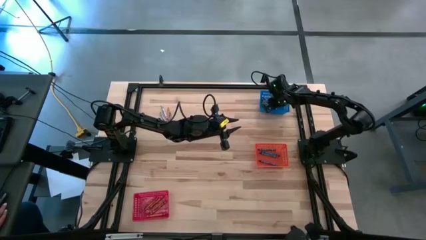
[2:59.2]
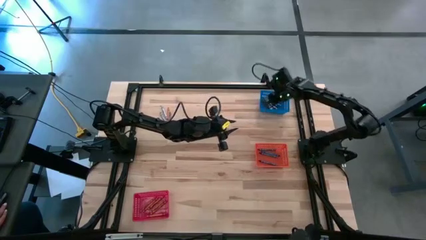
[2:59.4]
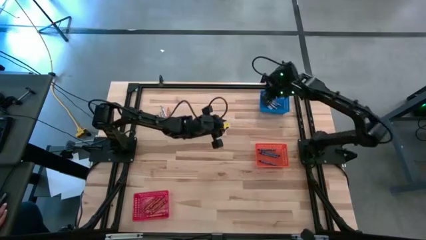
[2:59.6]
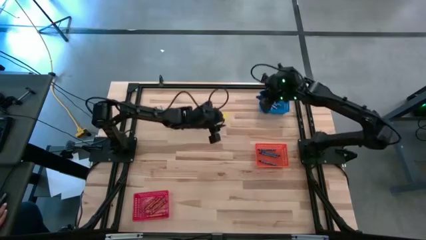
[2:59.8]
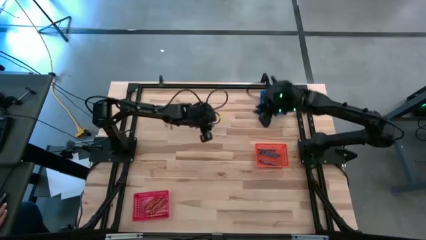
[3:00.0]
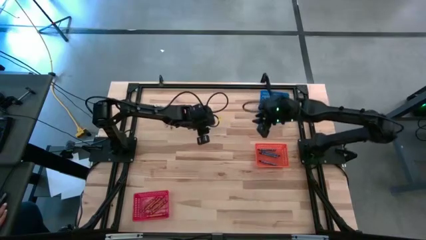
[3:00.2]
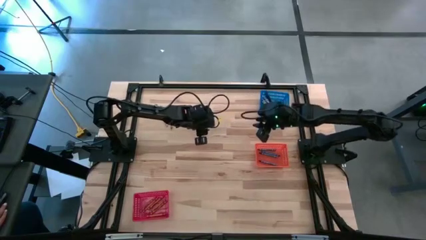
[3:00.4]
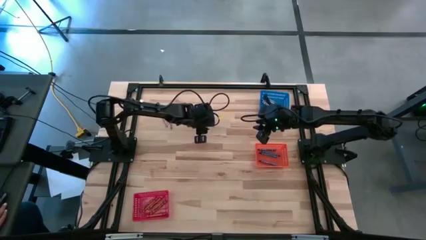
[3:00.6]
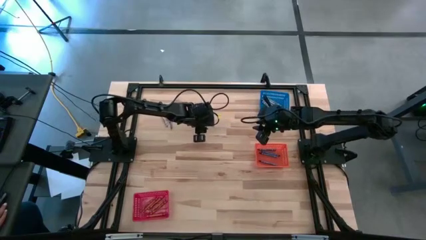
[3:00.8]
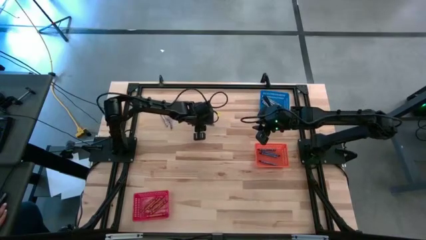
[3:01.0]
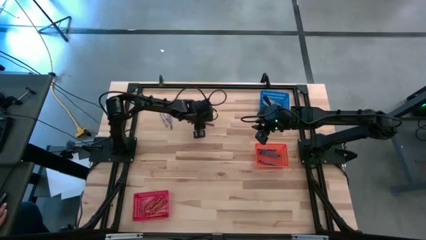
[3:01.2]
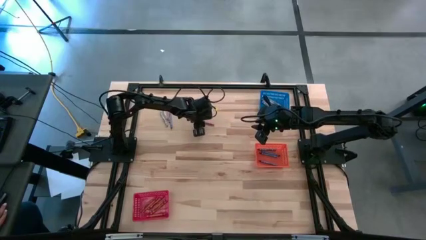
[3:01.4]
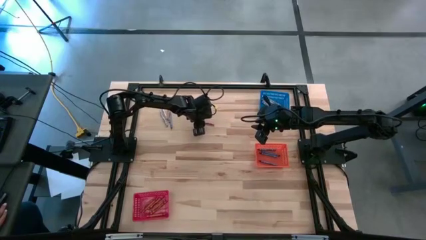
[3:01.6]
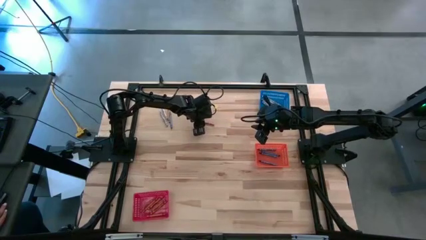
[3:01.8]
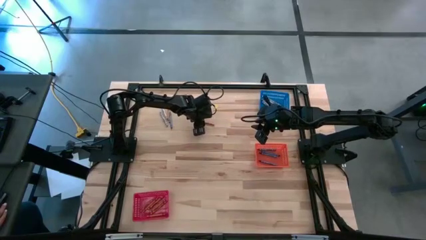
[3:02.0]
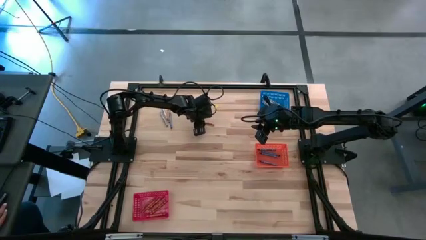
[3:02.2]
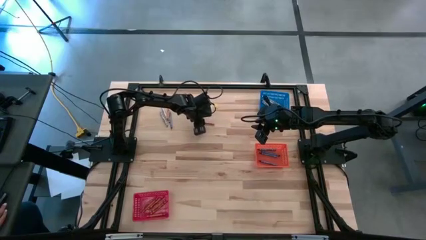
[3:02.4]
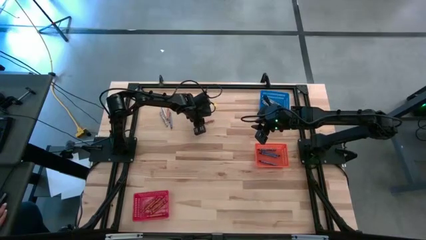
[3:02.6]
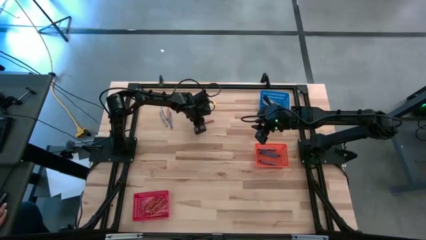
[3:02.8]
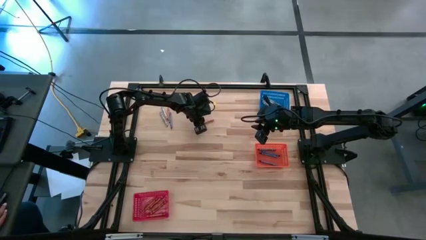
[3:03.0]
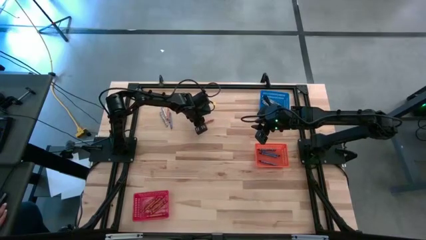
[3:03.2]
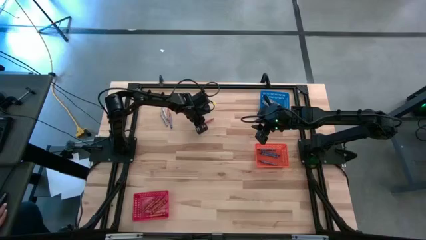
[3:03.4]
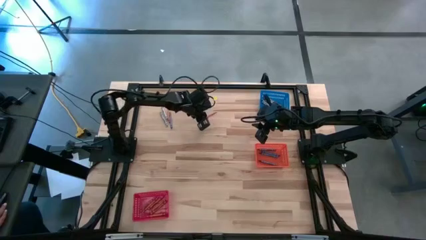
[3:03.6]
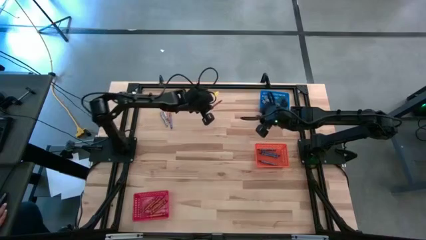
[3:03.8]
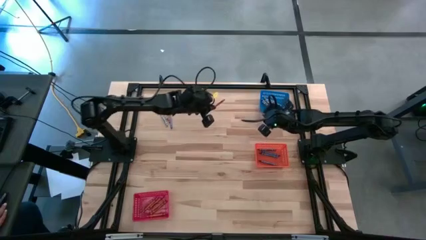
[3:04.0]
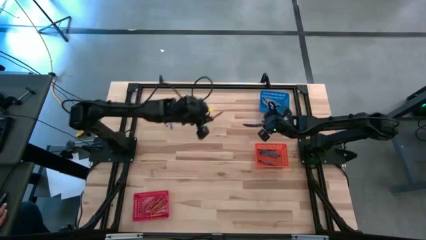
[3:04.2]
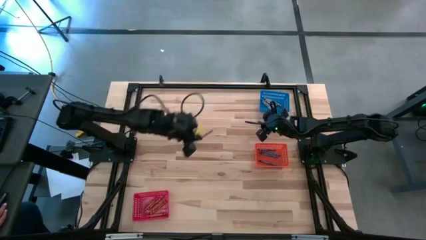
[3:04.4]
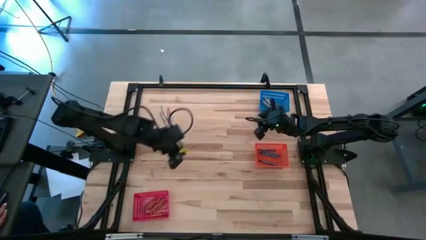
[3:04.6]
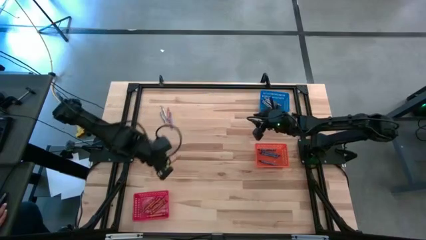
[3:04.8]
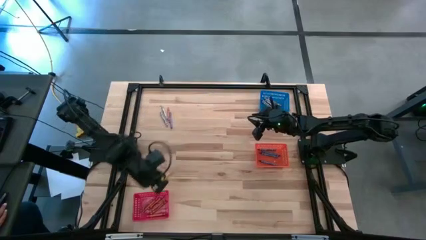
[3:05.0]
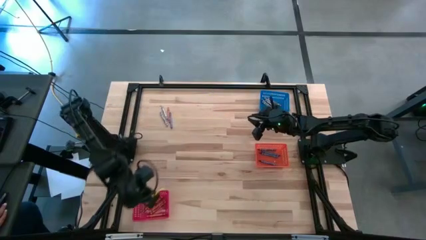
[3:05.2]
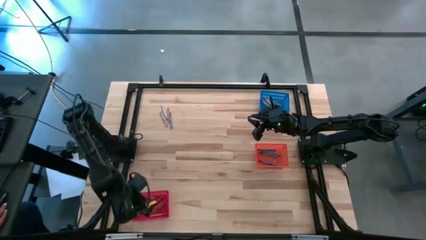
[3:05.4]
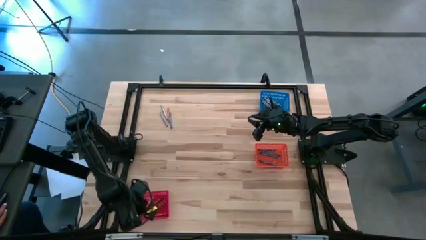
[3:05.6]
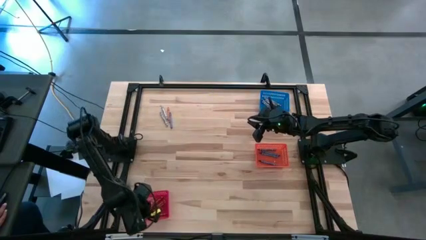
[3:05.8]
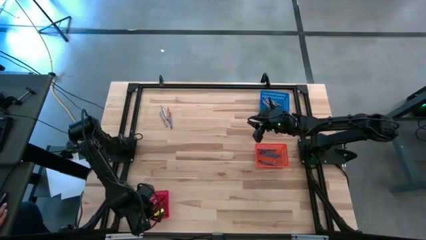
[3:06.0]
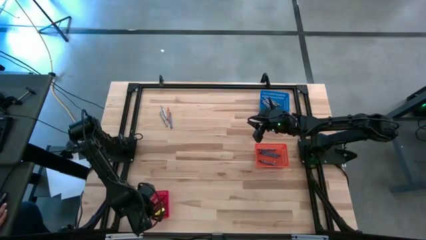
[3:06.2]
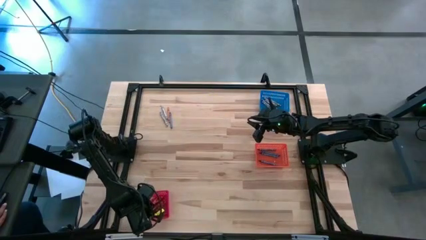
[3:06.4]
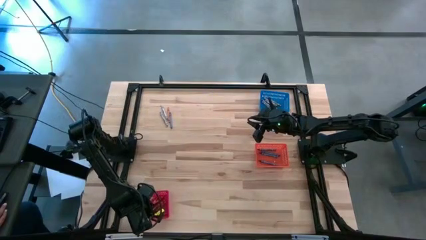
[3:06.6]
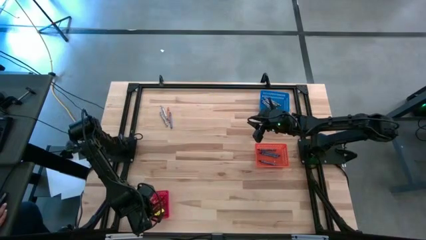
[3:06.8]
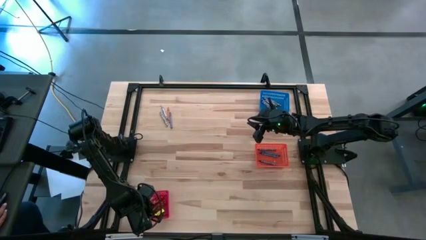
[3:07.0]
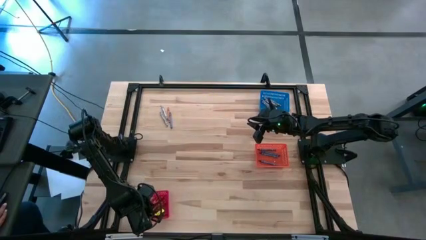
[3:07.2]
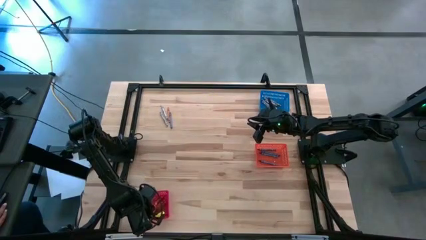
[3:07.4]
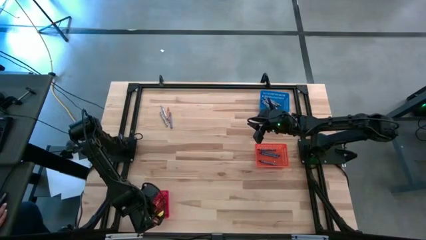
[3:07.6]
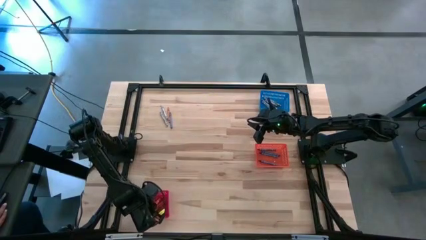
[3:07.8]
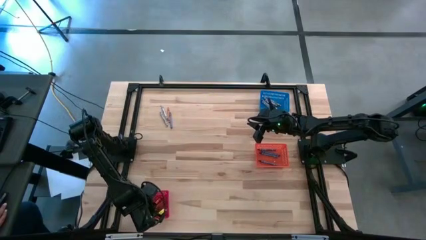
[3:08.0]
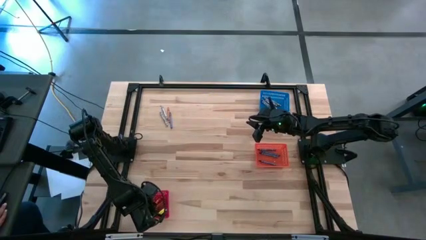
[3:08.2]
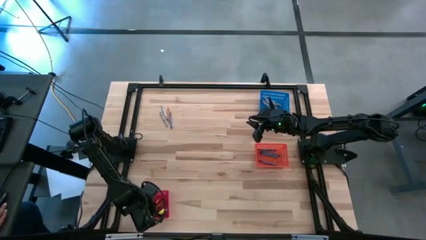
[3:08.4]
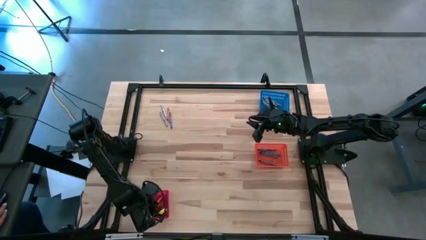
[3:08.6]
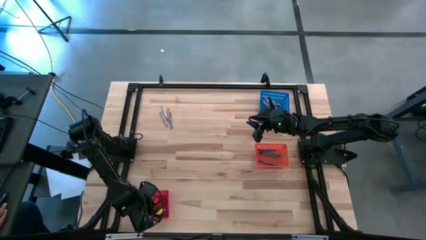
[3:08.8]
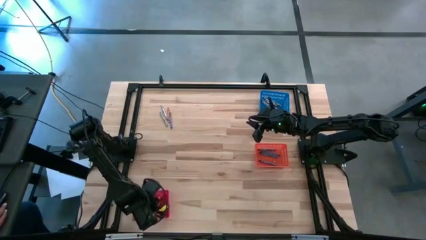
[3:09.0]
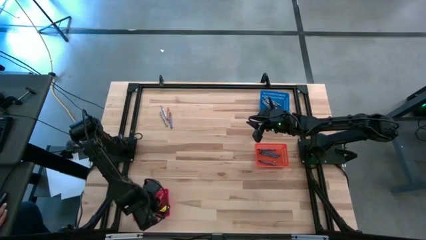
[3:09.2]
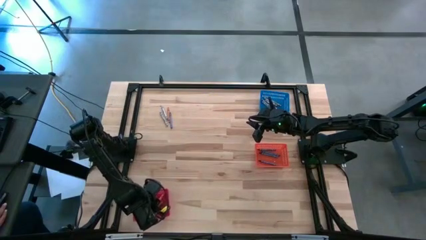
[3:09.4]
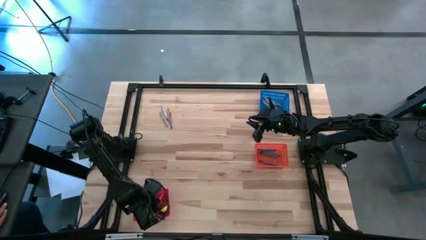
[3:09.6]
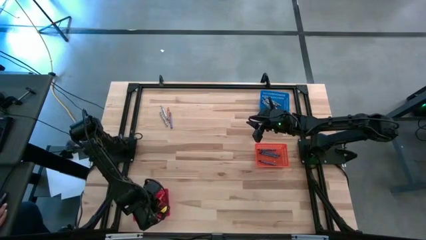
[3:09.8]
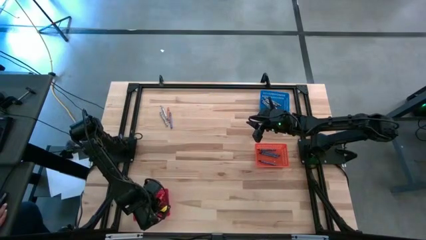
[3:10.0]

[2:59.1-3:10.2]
Task: Sort crayons
Put the orange crayon into the red bin

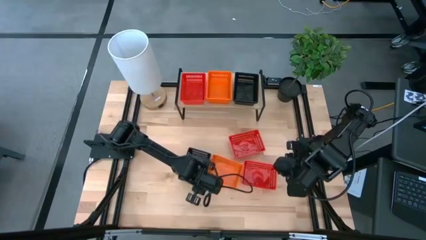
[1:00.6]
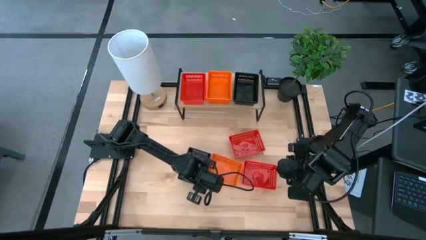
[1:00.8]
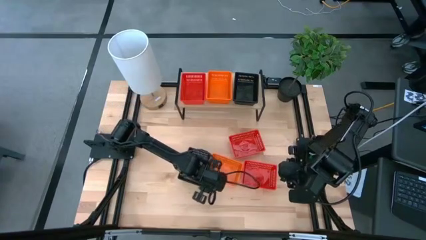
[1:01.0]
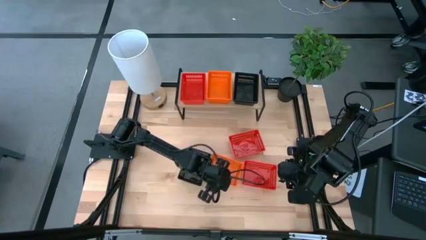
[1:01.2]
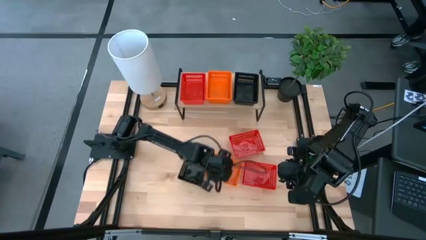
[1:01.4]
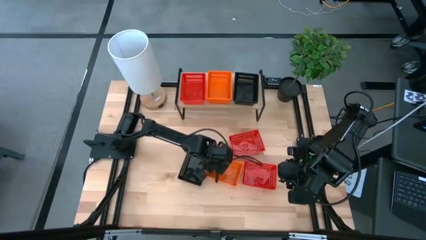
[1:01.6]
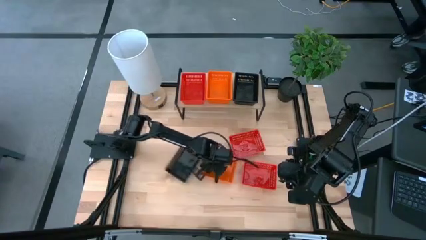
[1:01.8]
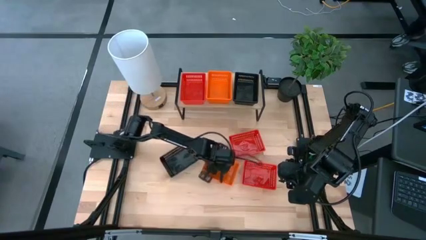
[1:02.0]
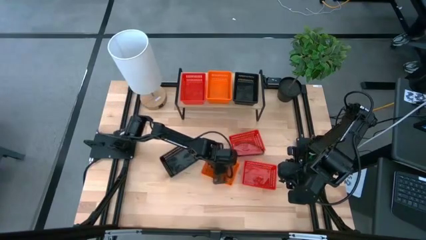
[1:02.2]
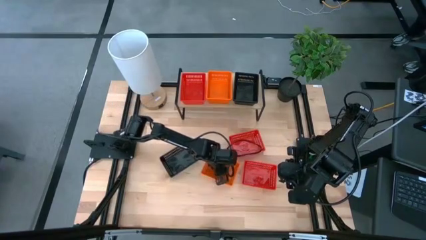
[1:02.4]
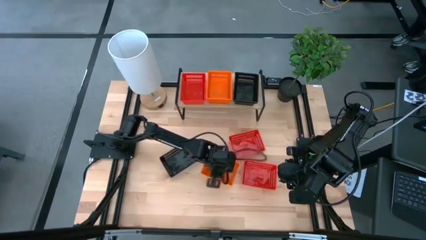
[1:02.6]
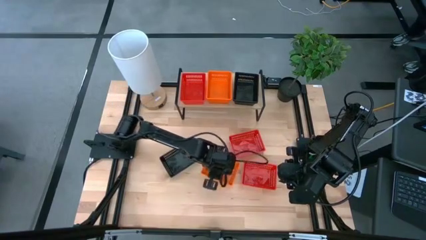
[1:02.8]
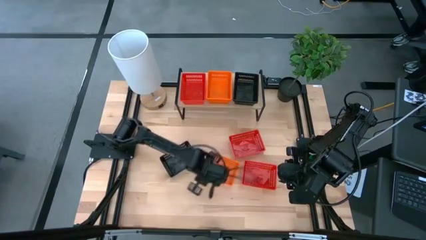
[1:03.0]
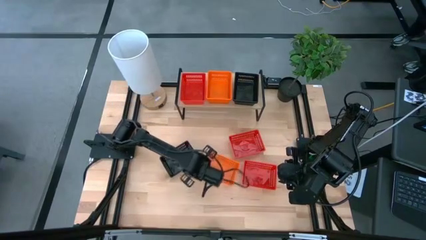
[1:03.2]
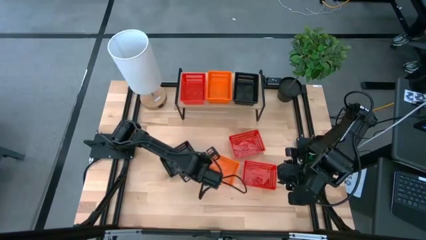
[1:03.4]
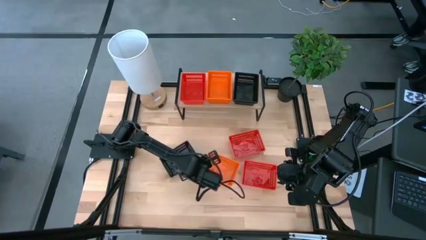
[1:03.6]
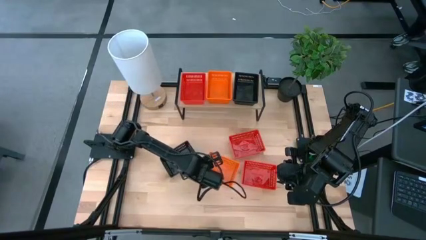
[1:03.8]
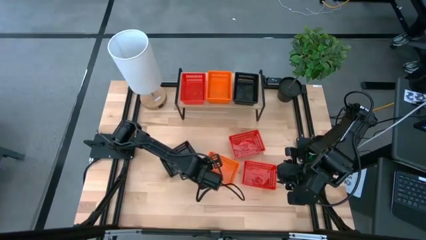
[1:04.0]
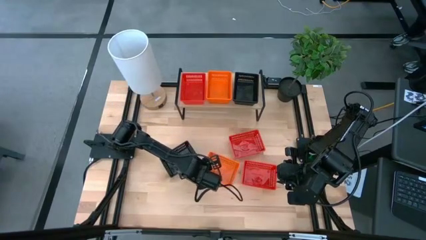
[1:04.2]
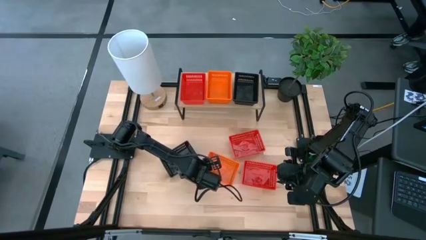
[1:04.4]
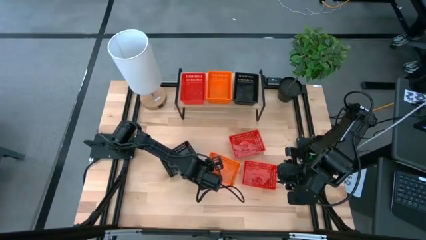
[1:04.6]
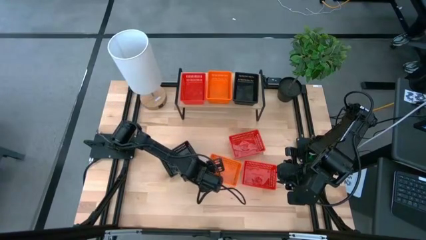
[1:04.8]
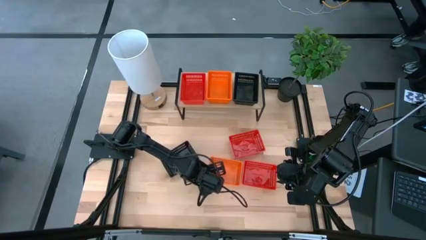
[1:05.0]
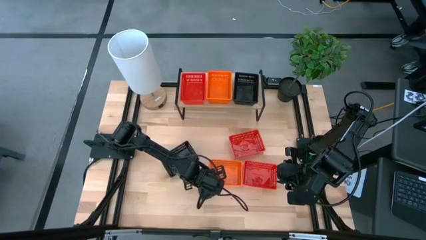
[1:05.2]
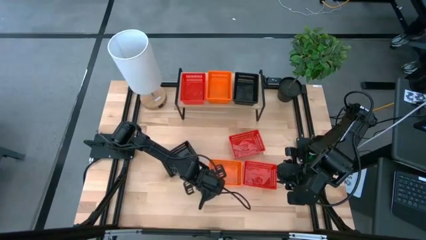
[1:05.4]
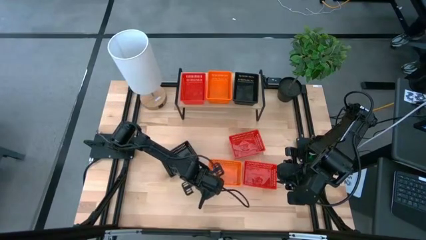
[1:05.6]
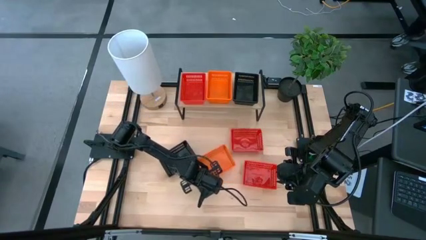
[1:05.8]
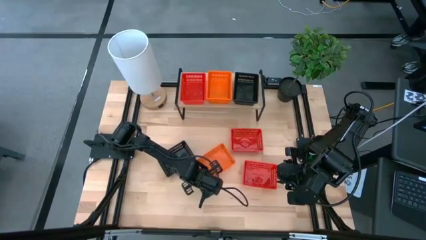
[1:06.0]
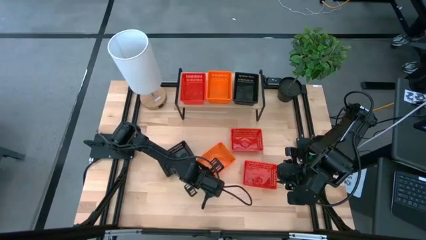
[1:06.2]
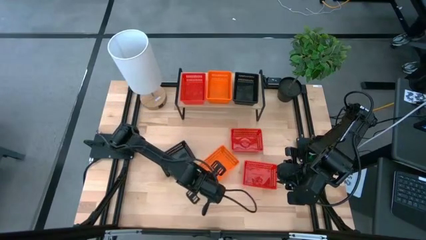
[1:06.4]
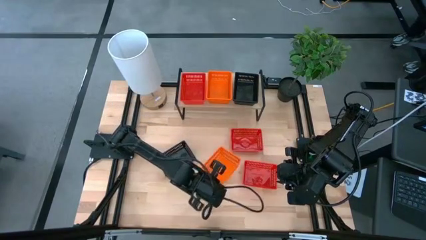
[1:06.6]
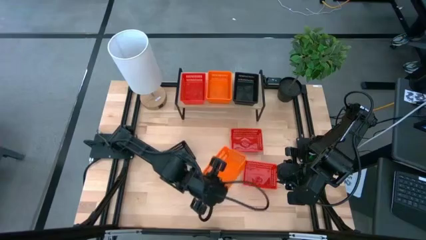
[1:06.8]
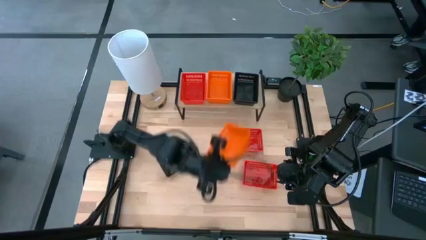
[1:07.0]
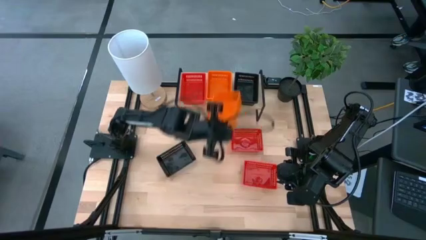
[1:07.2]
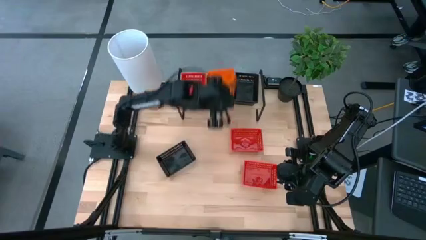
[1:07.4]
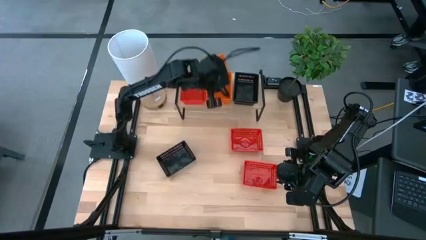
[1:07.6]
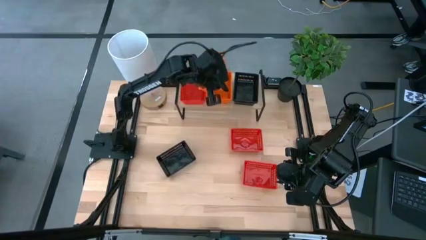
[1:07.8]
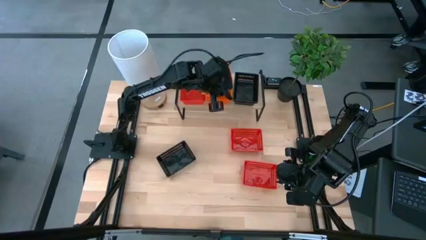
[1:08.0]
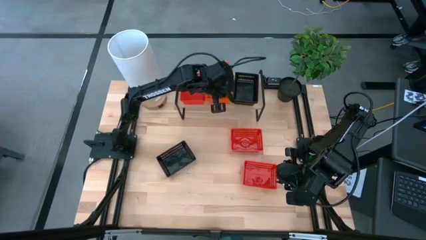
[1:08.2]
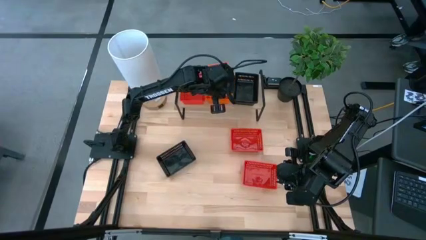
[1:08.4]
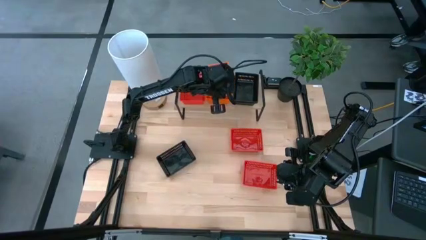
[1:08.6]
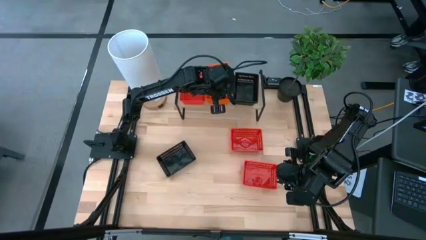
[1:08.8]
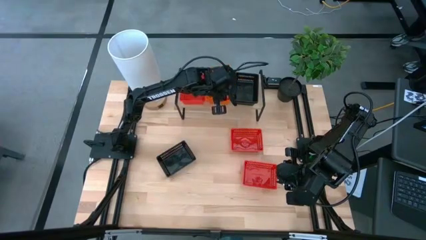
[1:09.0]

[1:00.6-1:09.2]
Task: Stack baskets on shelf by color
Stack the orange basket on the stacked orange baskets on the shelf
